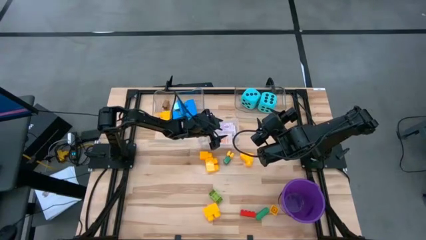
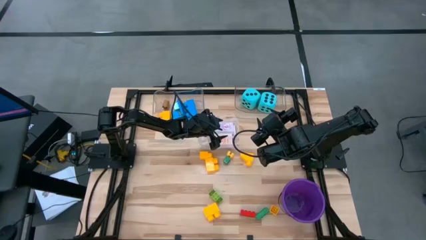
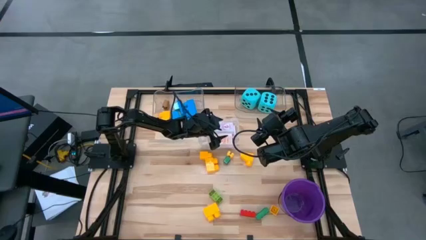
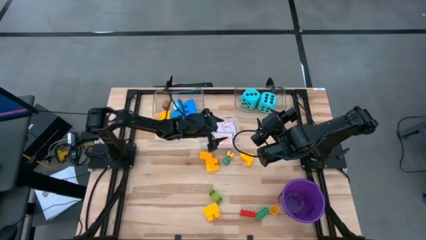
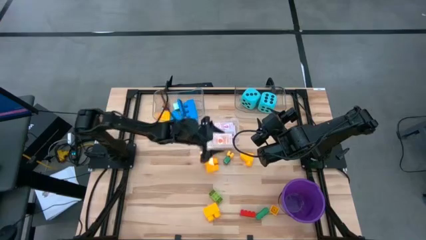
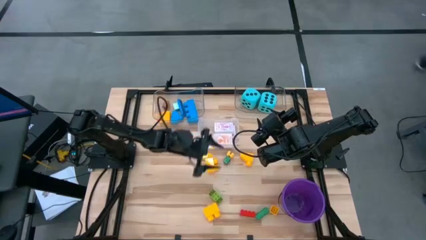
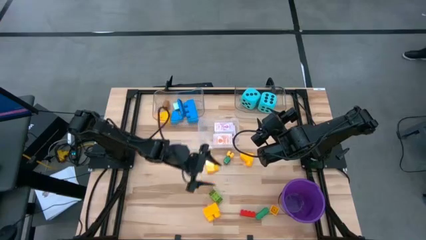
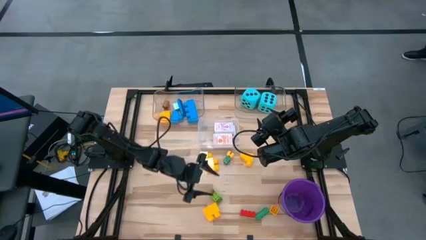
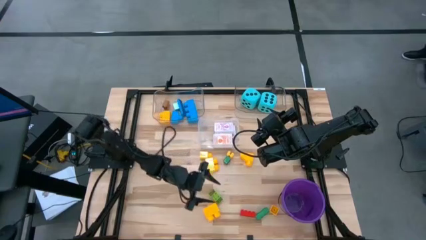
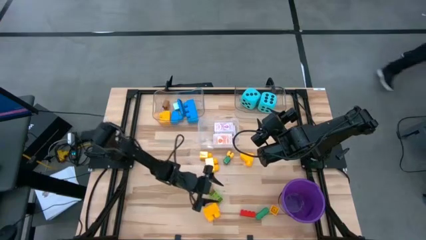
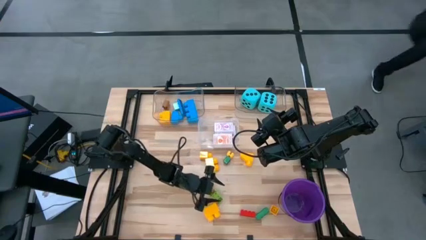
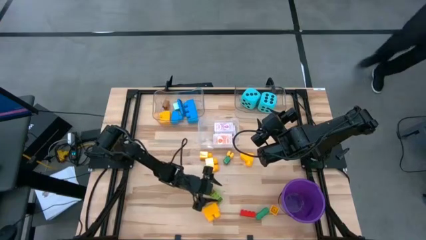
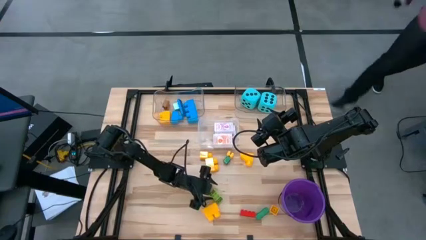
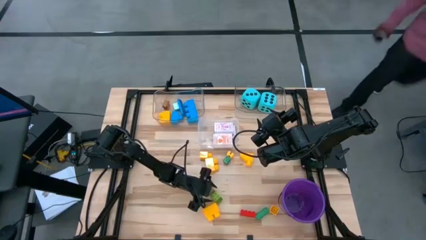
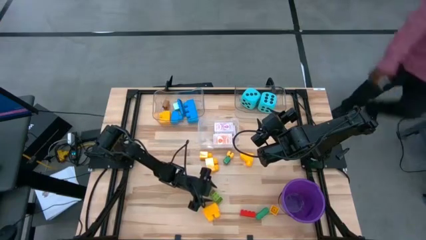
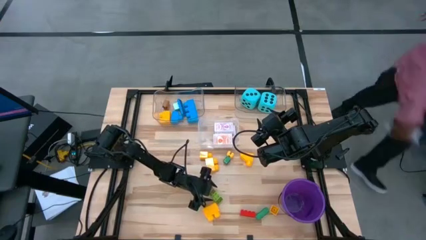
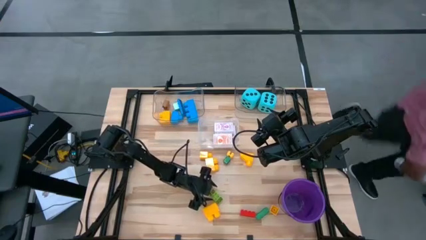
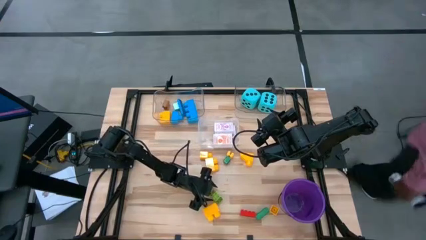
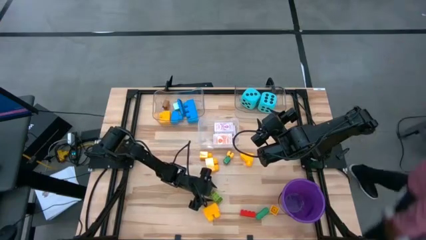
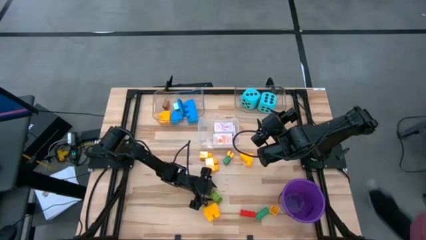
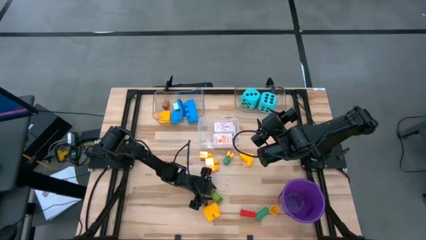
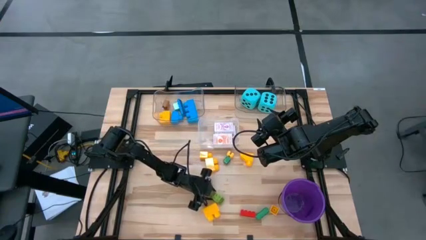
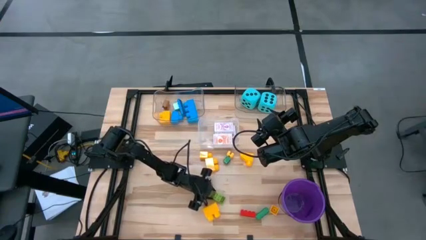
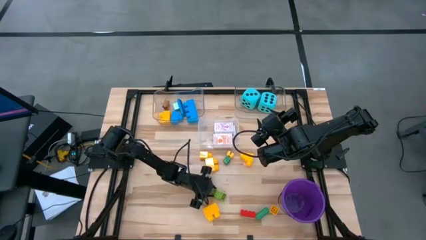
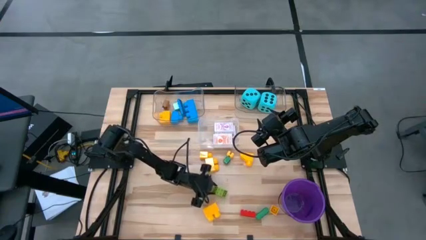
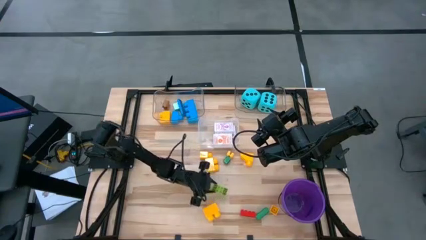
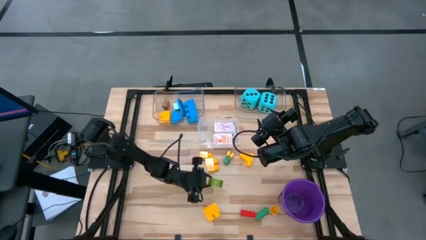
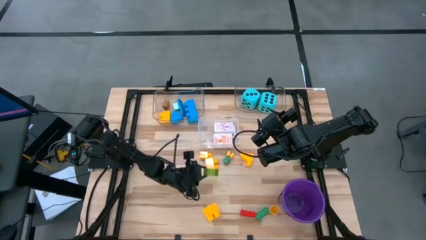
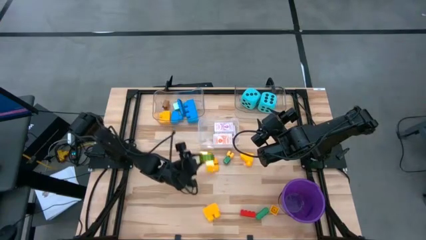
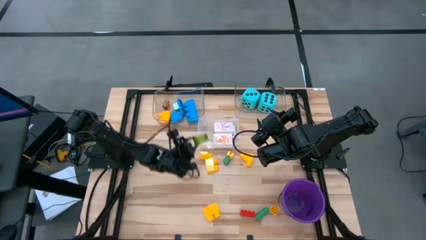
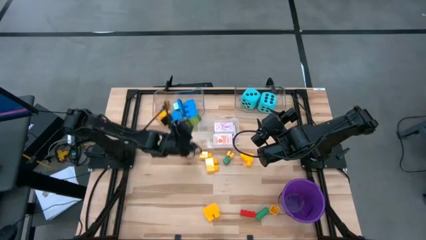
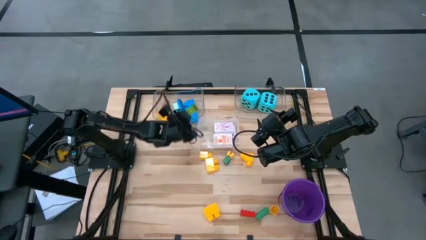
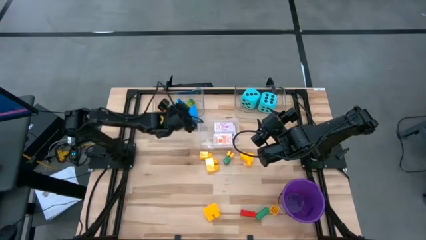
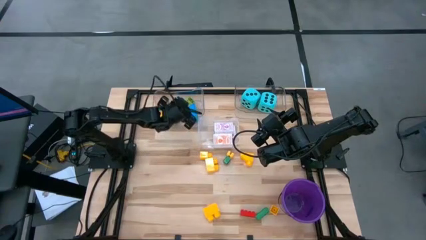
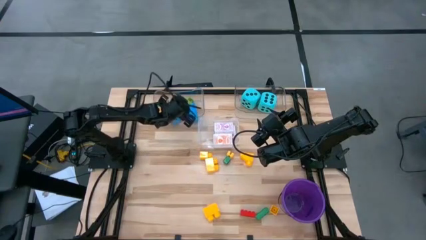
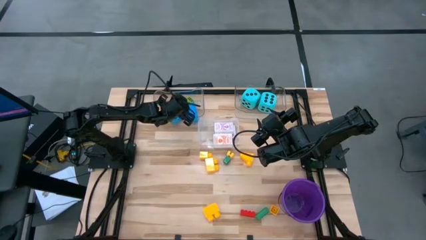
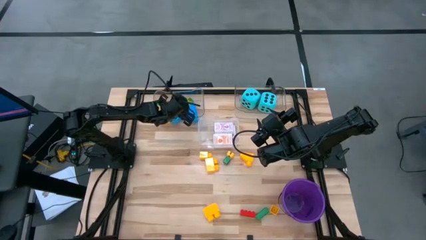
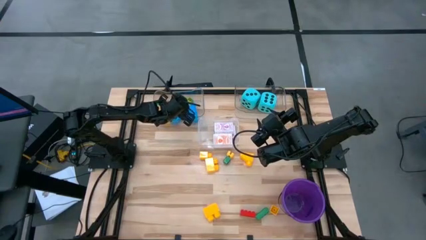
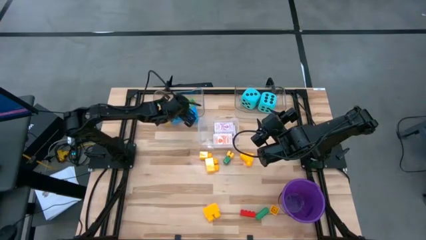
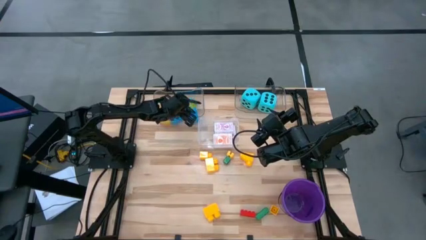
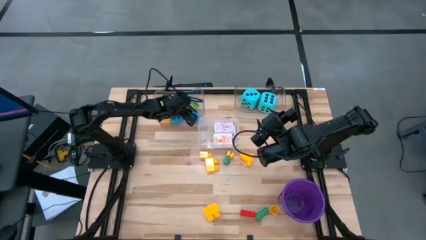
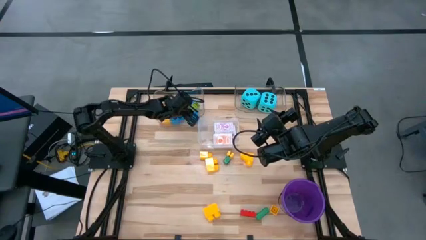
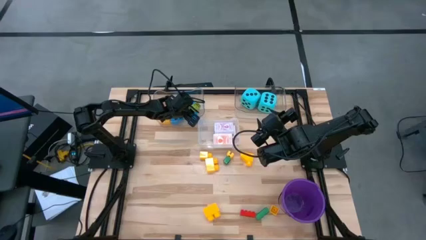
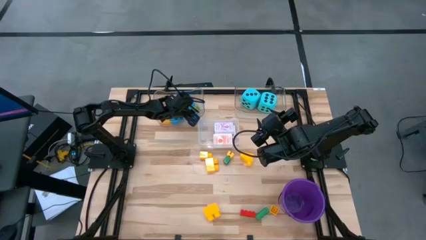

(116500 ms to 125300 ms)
Task: Pick & Place Toys
Put the light green game piece into the top left transparent bin

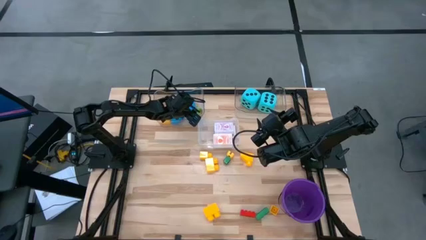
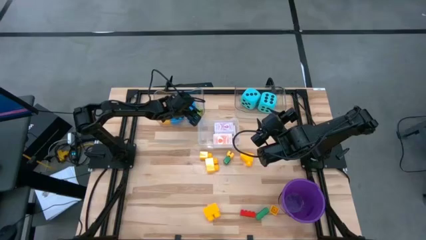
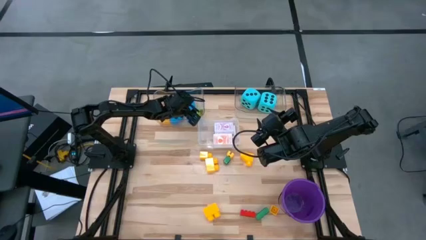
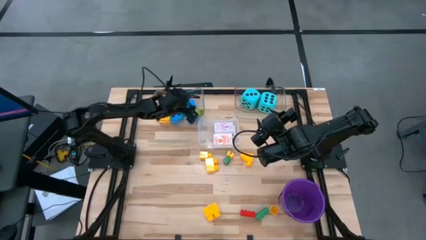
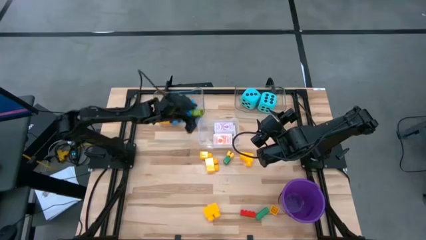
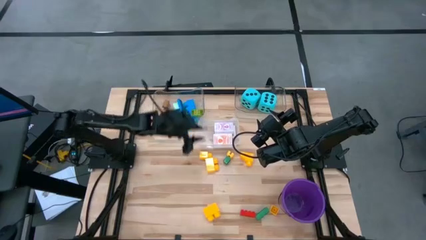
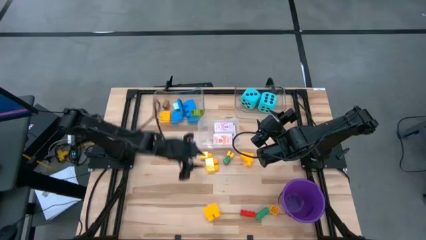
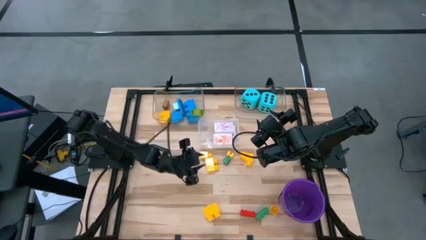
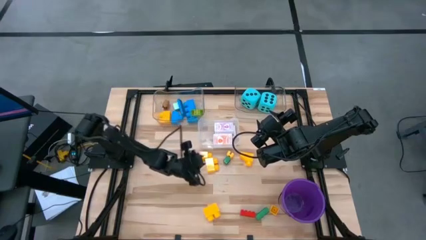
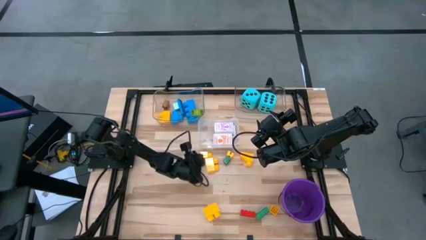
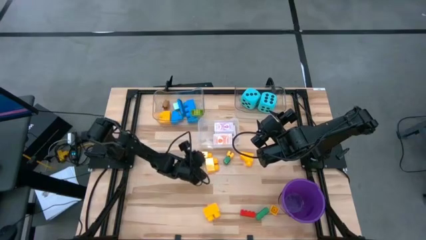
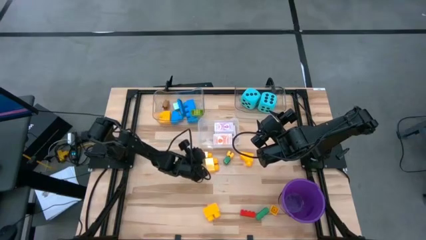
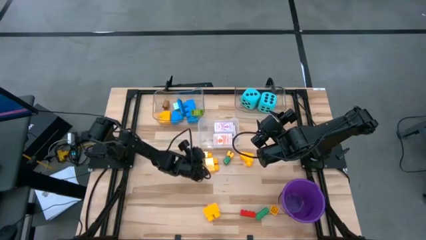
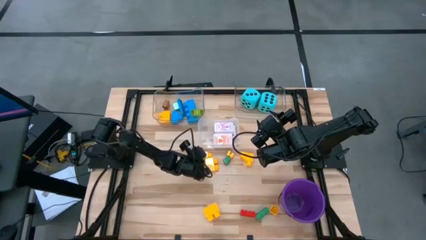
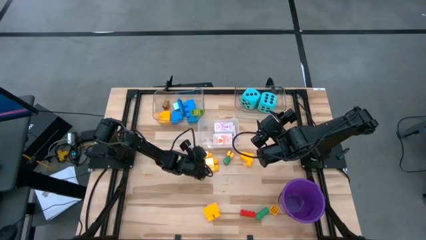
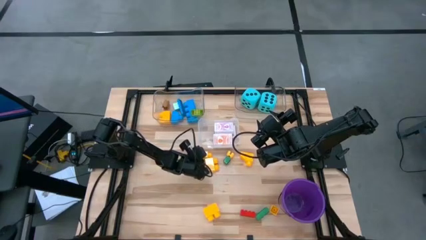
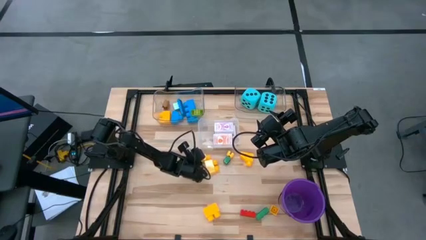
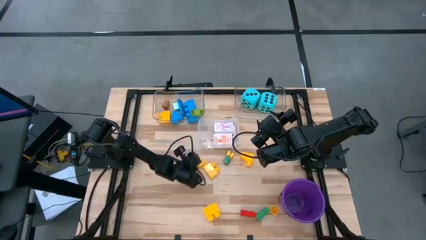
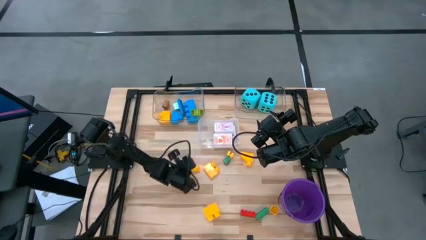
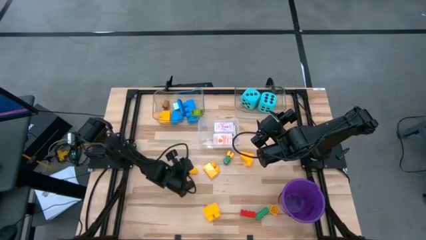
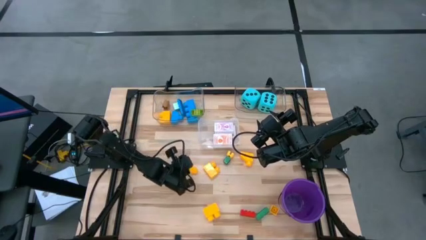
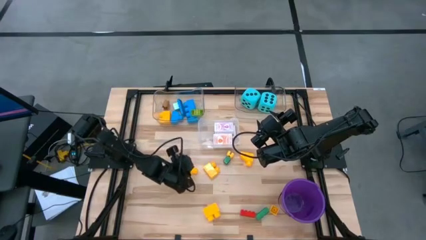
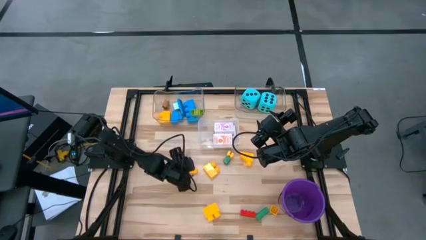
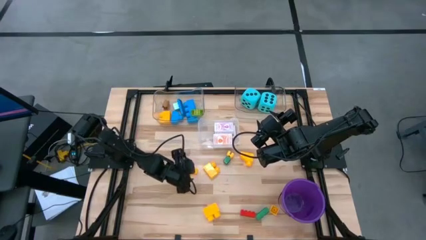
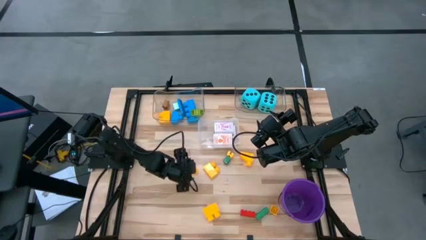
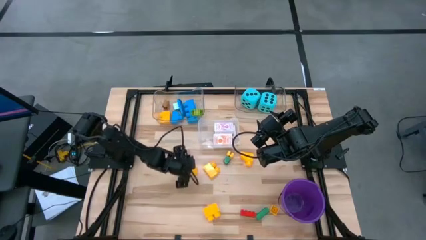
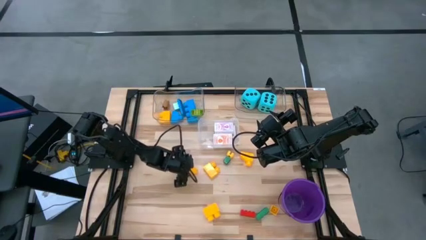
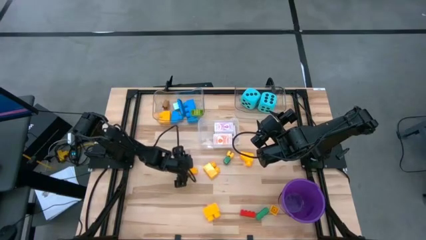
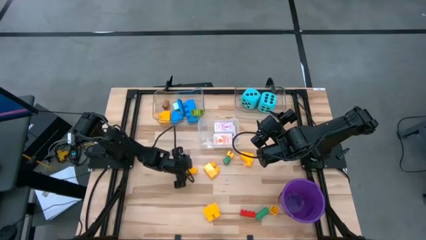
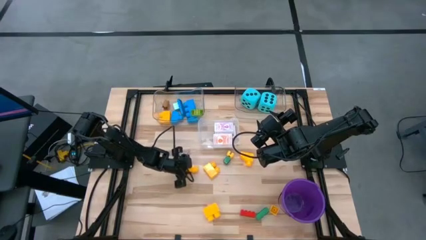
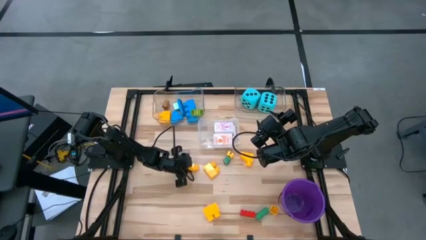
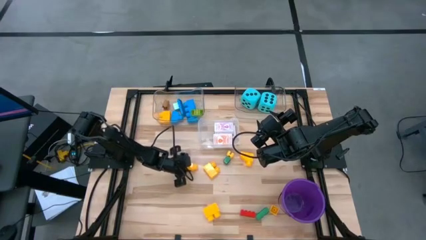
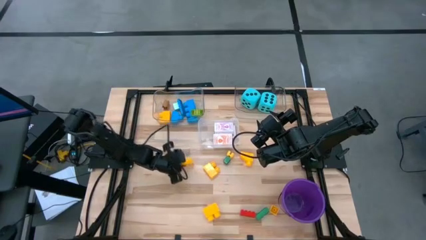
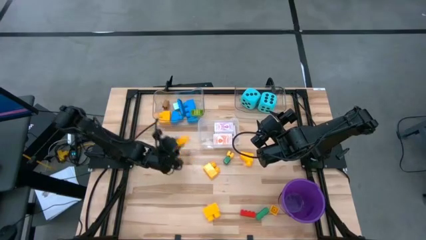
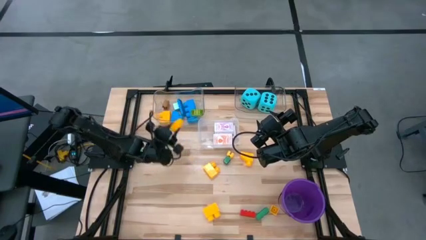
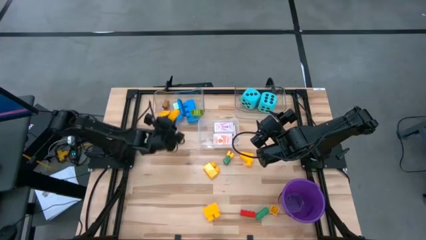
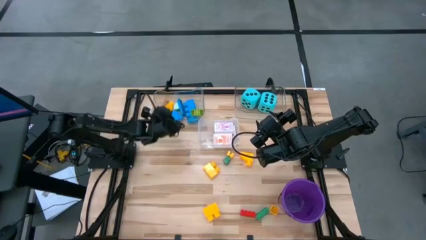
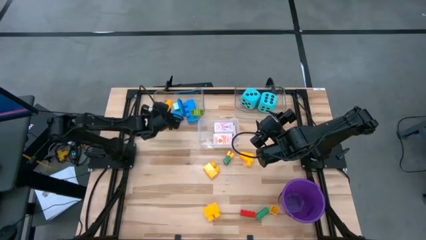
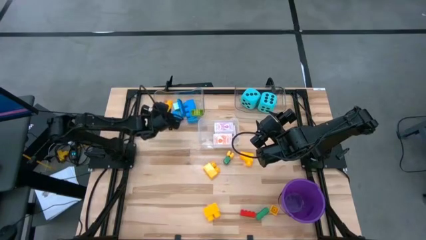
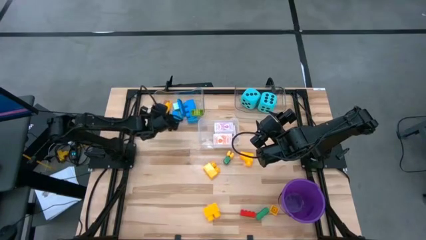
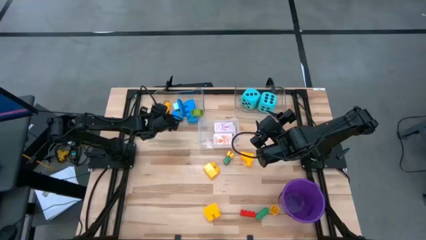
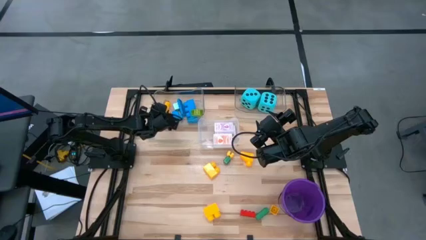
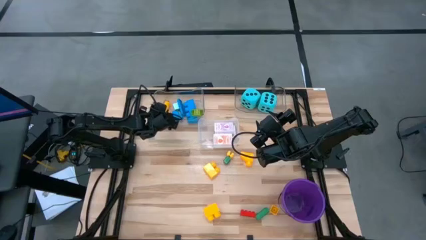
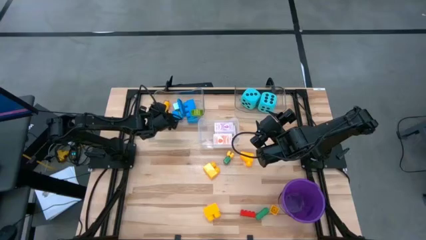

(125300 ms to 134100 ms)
Put the yellow game piece into the top left transparent bin
